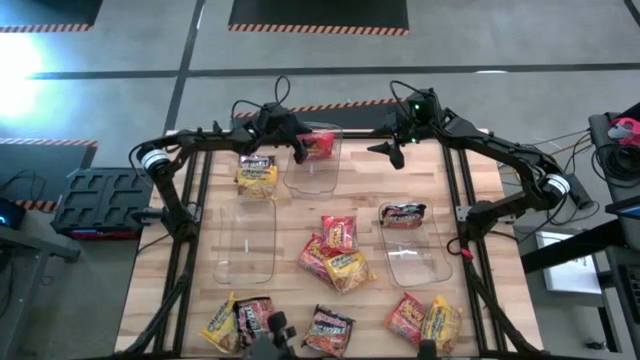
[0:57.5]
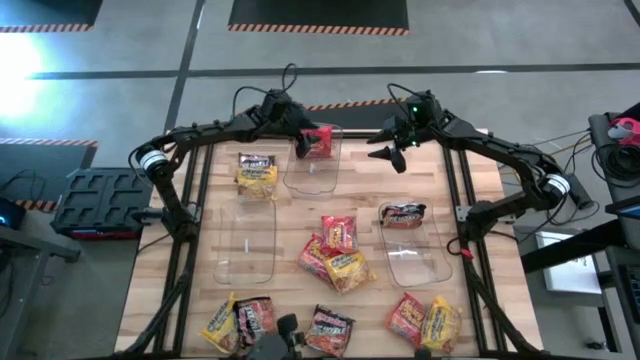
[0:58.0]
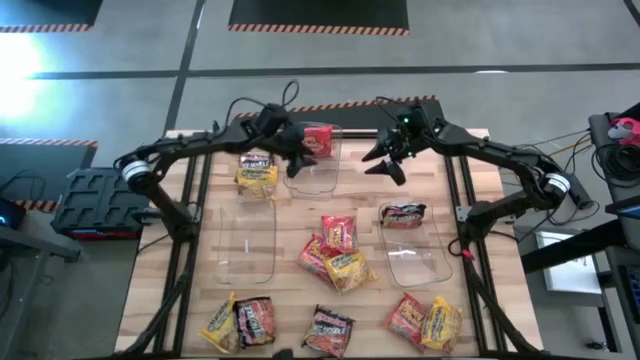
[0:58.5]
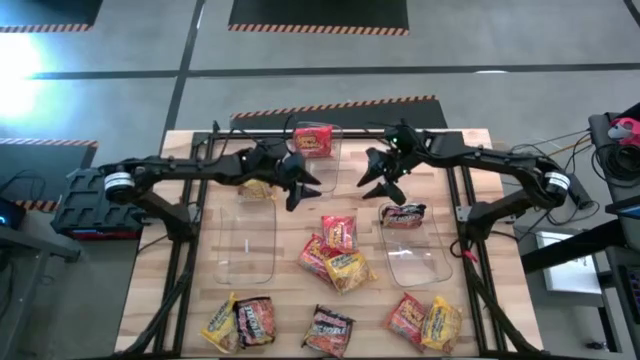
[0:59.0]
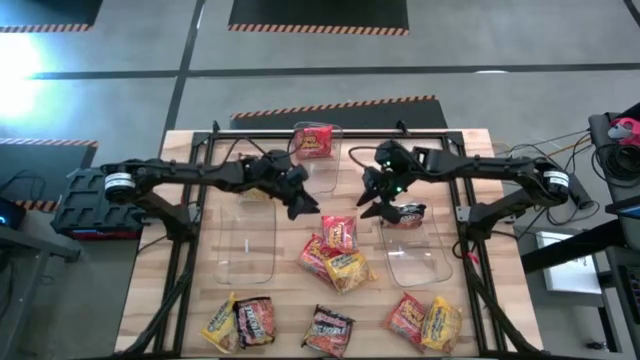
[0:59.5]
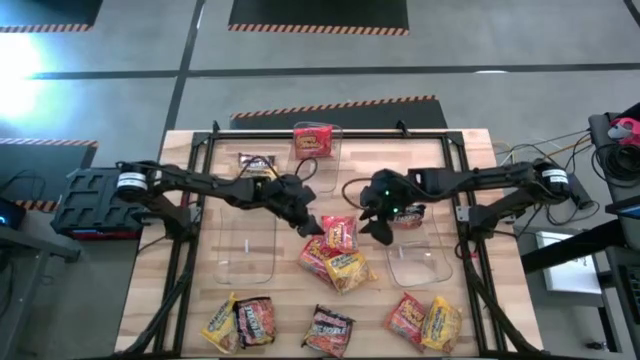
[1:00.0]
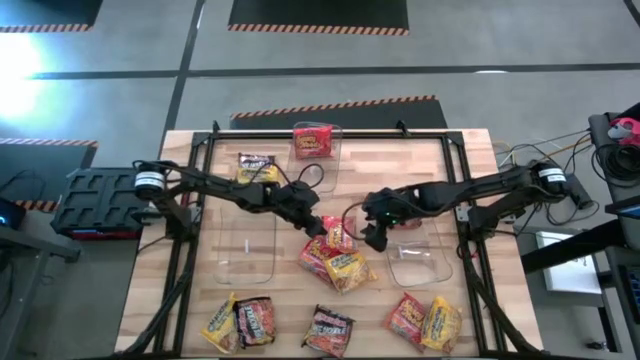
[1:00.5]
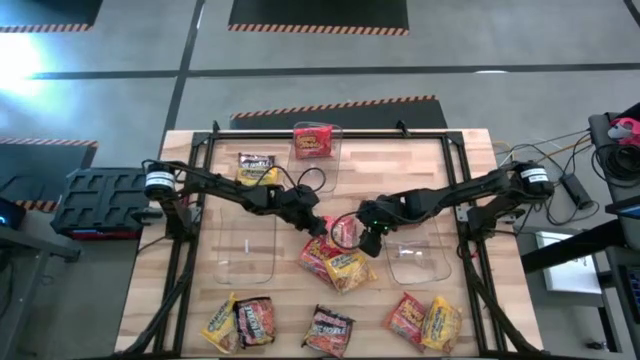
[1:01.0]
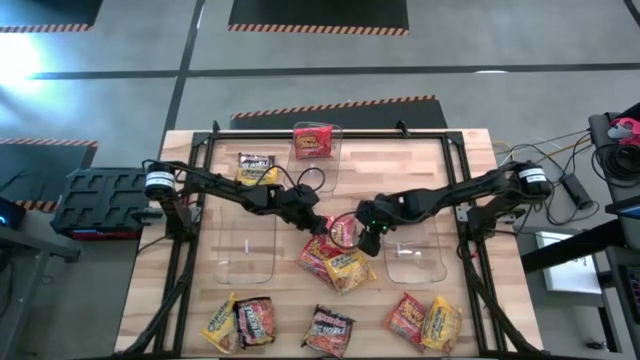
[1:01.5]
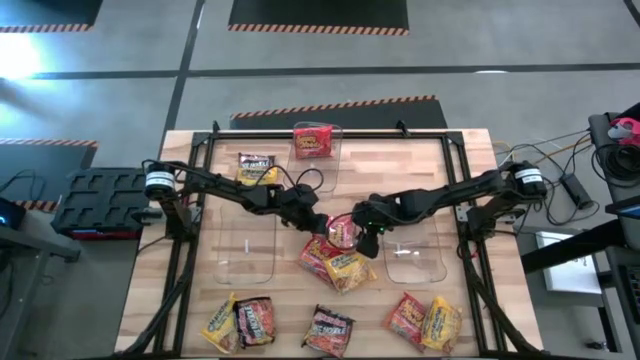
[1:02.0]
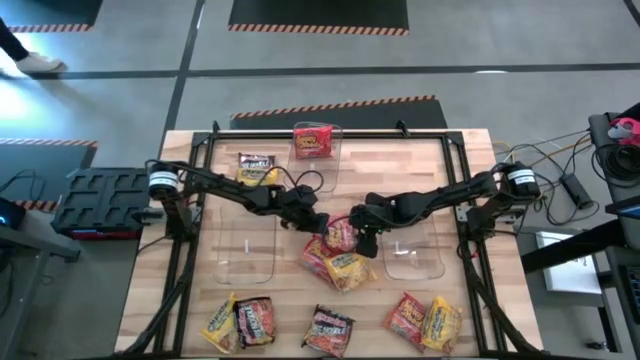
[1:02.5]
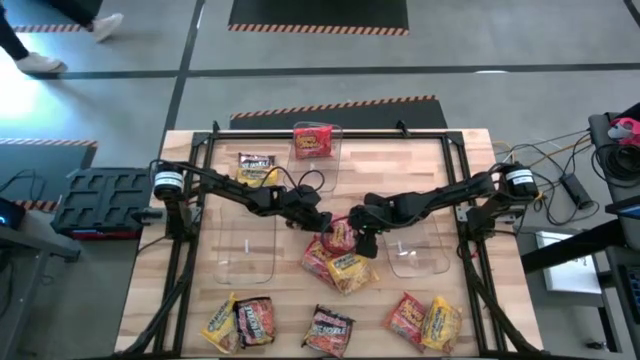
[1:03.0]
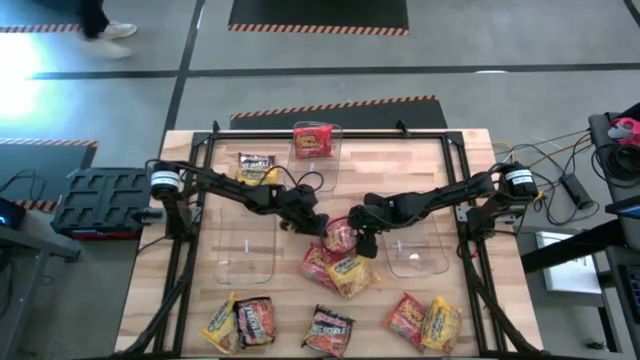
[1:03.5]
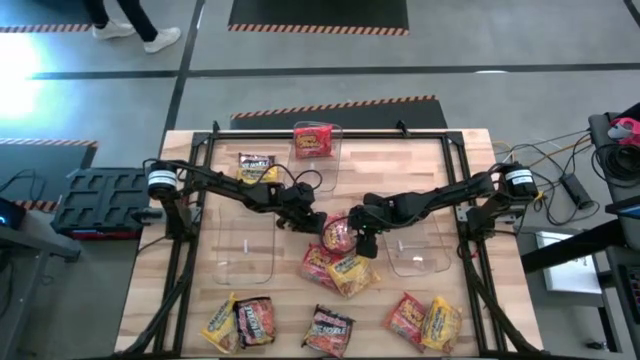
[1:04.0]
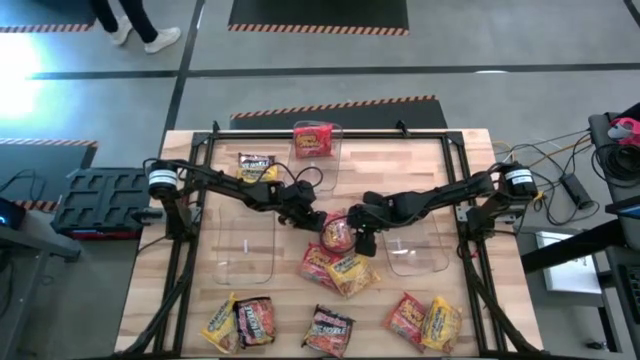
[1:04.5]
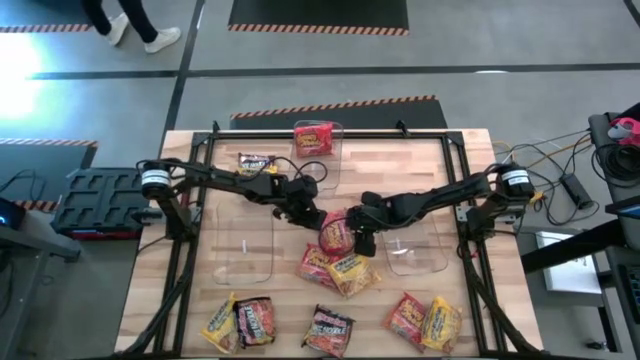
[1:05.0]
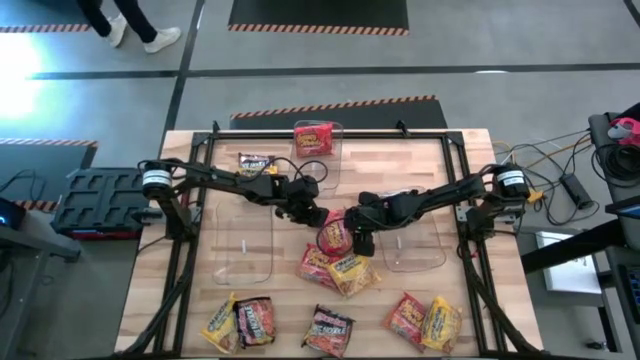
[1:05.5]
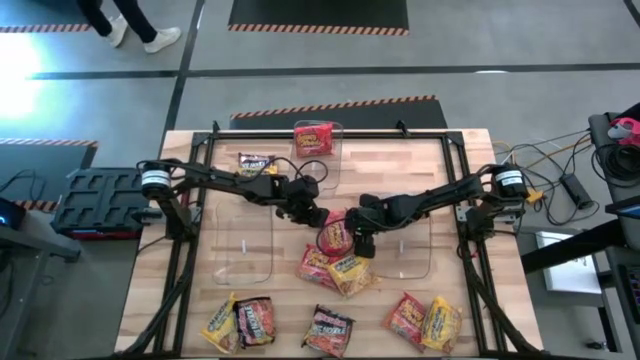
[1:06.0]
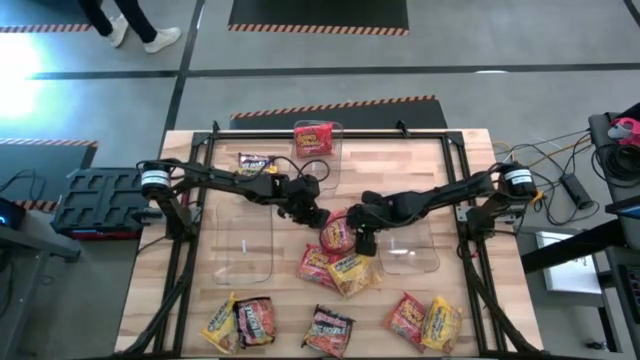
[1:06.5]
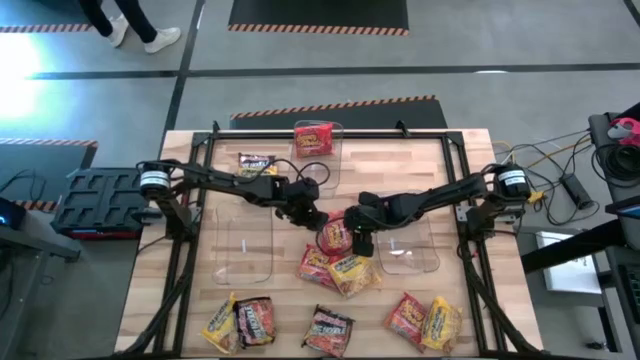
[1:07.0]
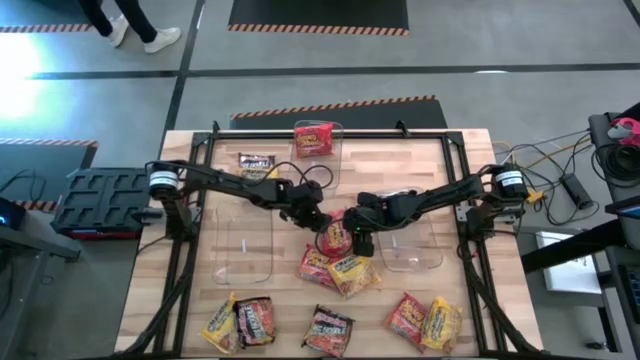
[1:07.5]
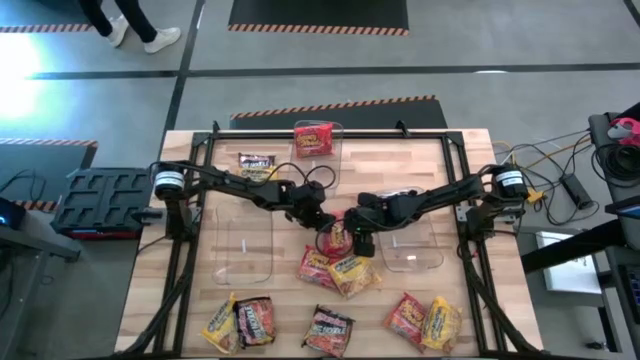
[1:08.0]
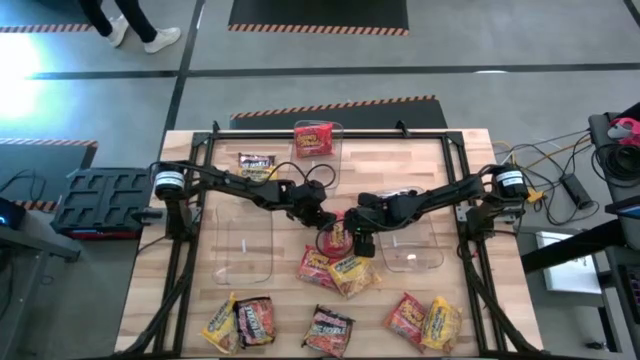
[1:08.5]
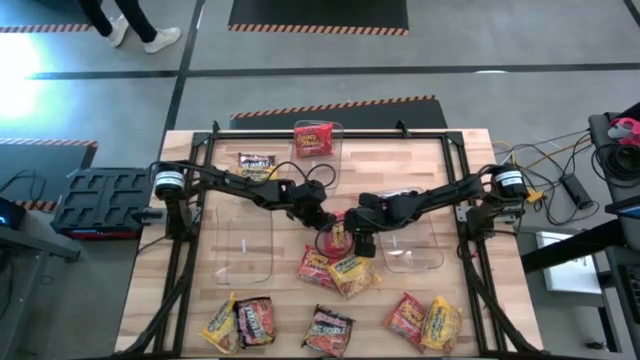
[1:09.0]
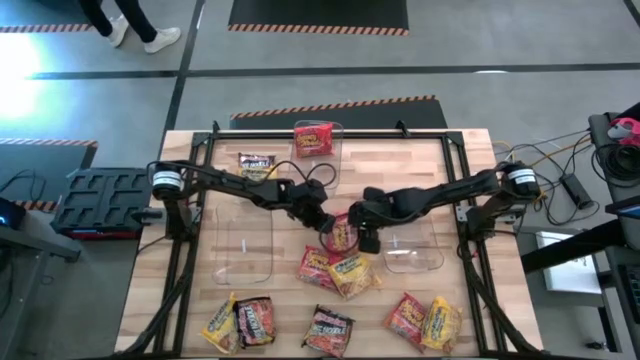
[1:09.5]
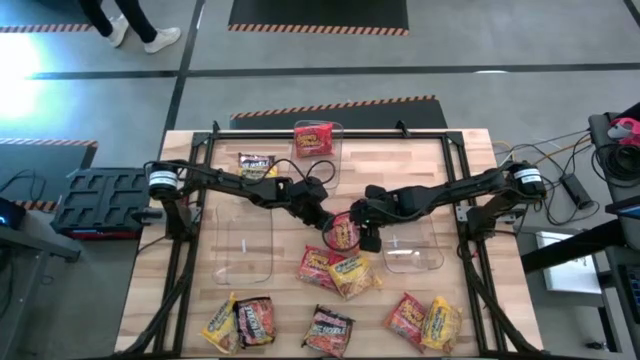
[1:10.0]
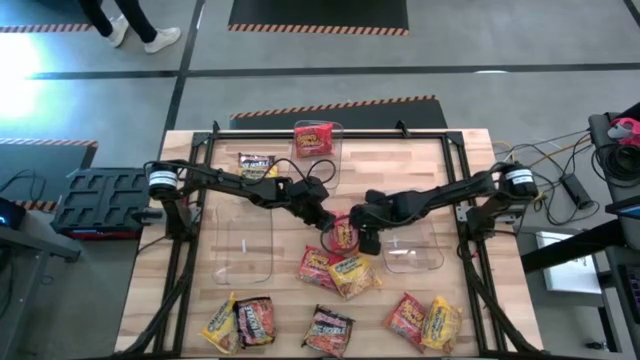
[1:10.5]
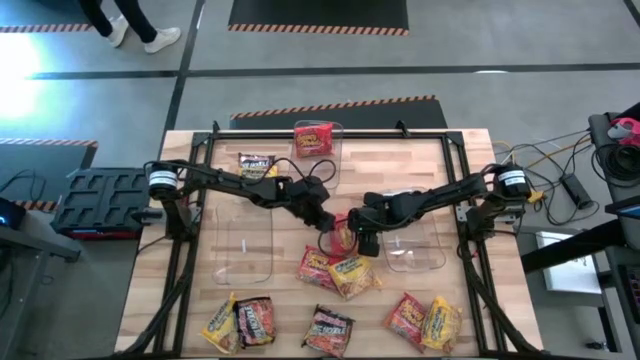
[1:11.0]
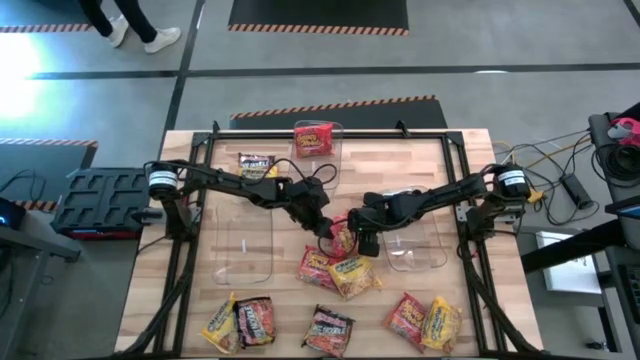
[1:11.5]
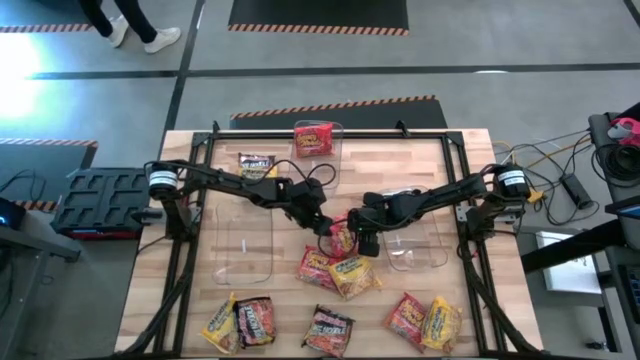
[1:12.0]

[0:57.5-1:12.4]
Task: Sort Maruchan noodles
Put the top orange pack noodle into the top transparent bin

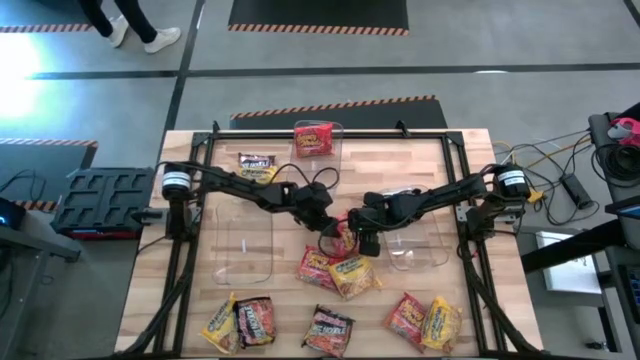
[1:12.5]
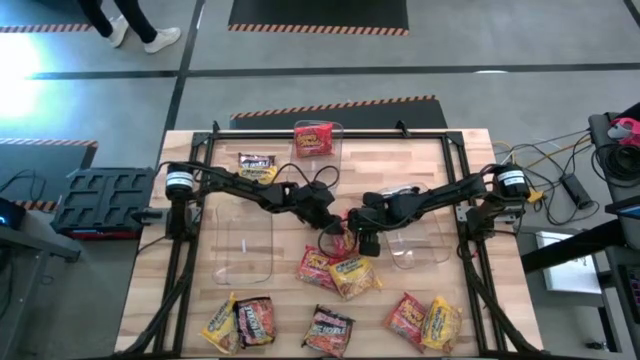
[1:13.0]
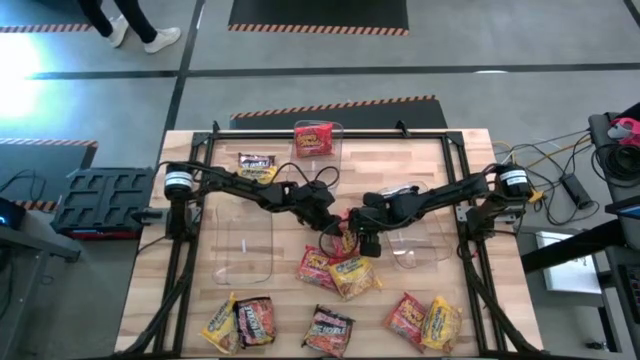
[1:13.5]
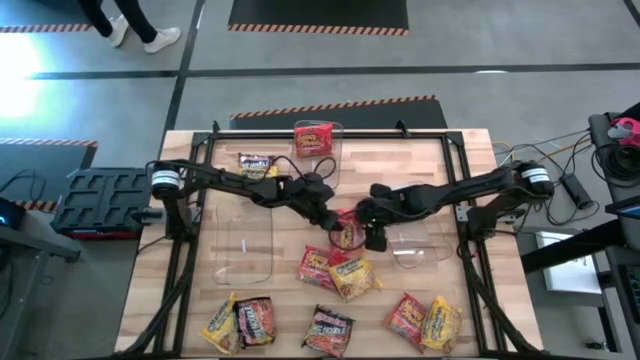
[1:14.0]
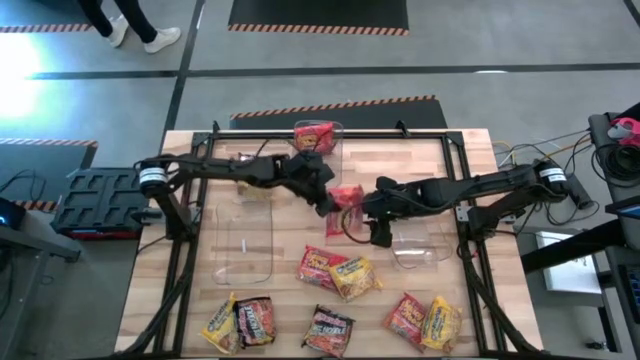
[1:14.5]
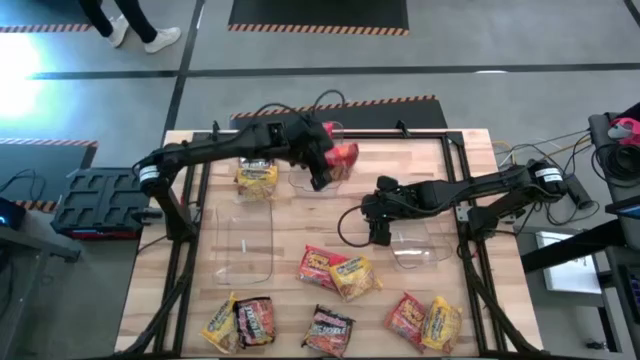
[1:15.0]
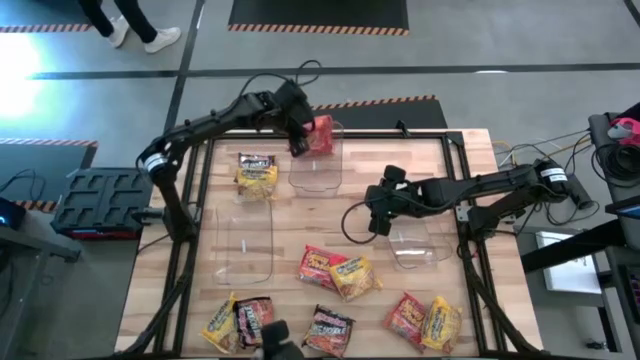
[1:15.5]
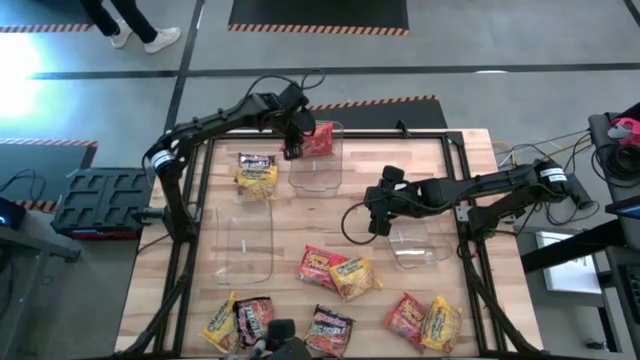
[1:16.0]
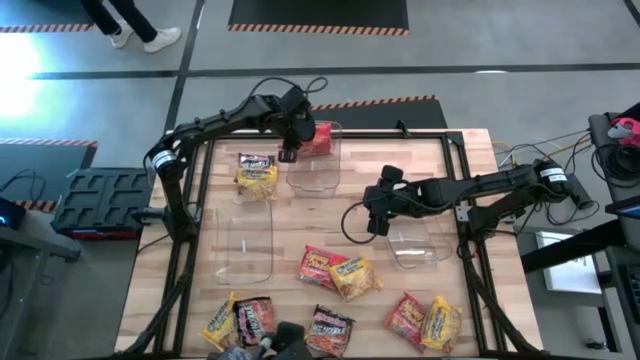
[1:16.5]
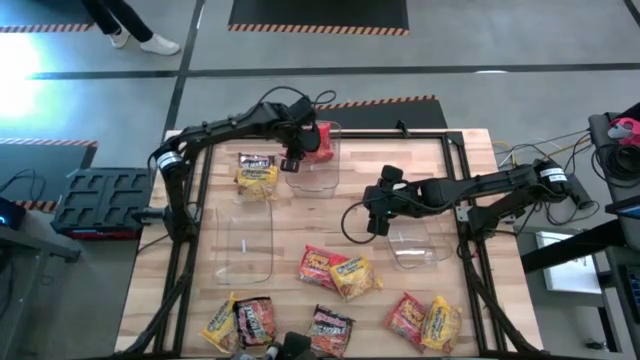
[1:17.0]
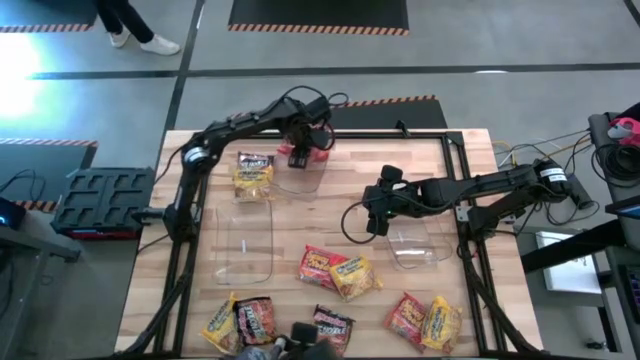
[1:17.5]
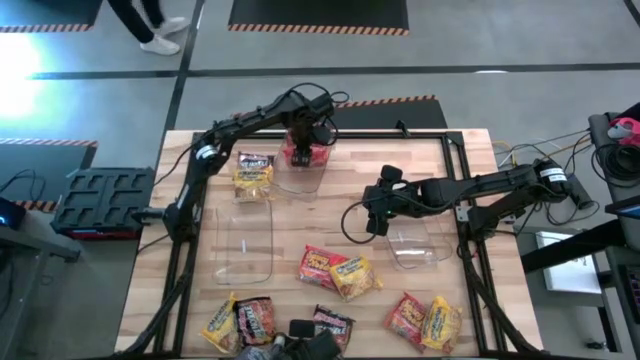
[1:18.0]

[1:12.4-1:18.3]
Put the top orange pack noodle into the top transparent bin

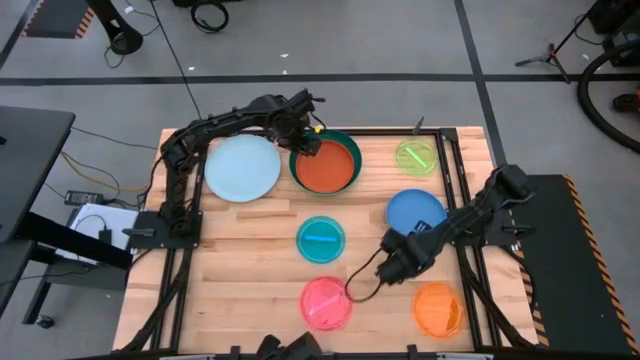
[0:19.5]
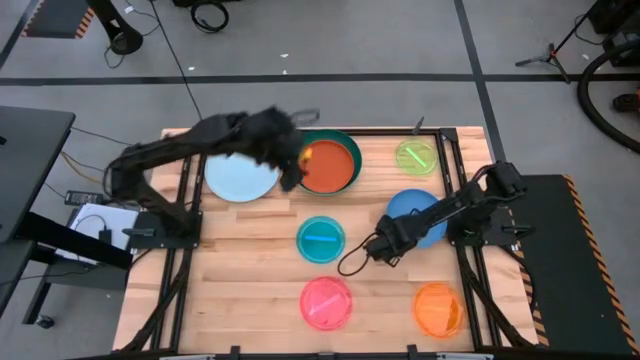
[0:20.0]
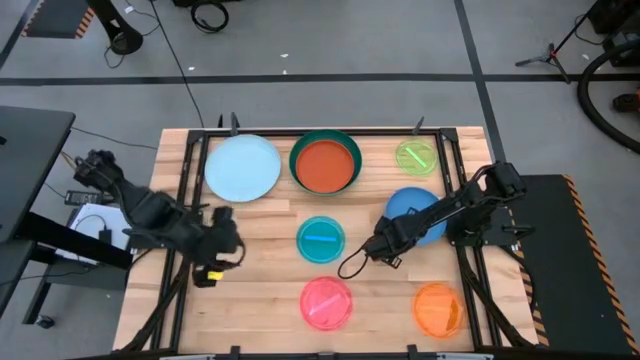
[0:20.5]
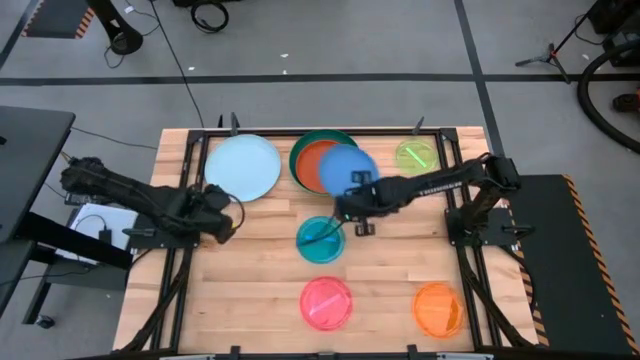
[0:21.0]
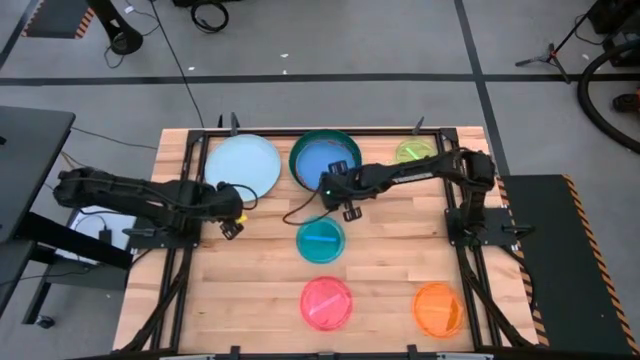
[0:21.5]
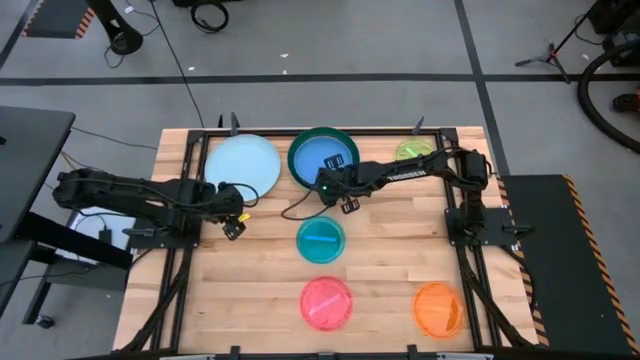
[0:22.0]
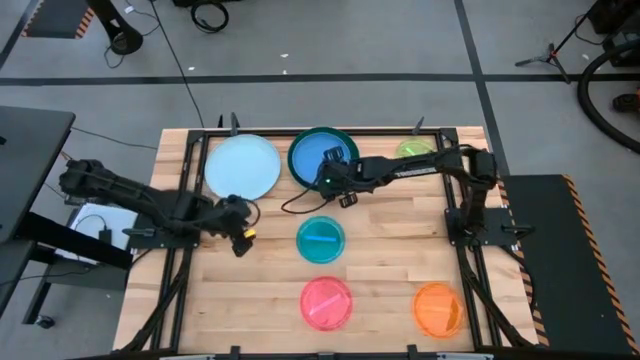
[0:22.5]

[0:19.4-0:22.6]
Task: Stack plastic plates
Stack the blue plate on top of the dark orange plate
